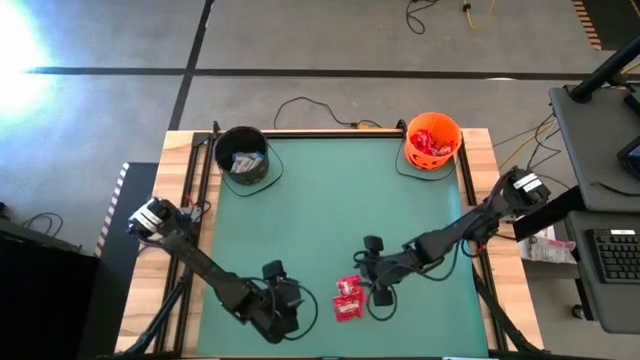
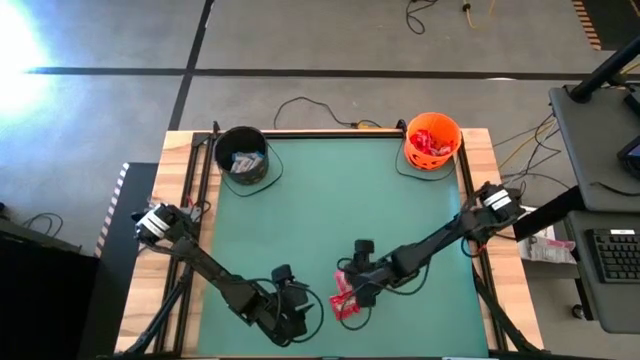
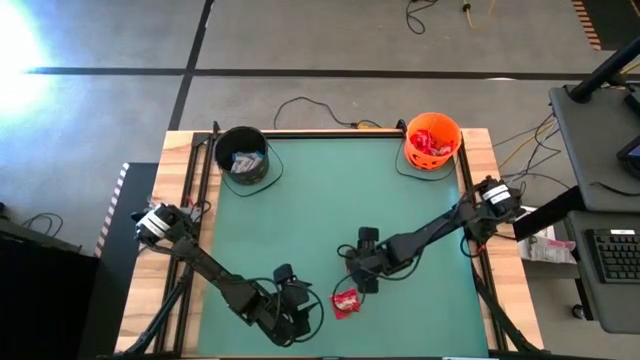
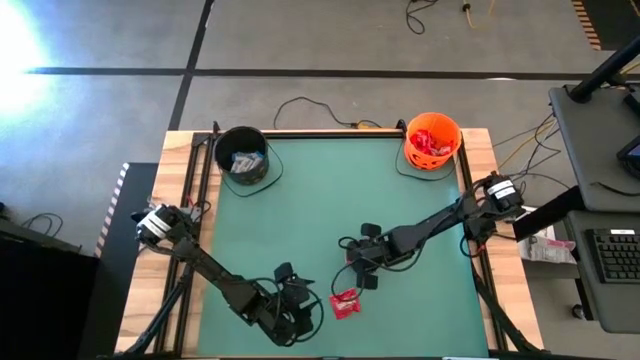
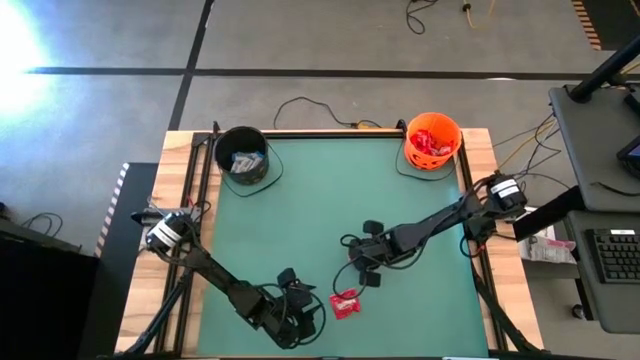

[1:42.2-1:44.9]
Task: Sort candy by brand, put in halloween buckets
Put the red candy into the orange bucket

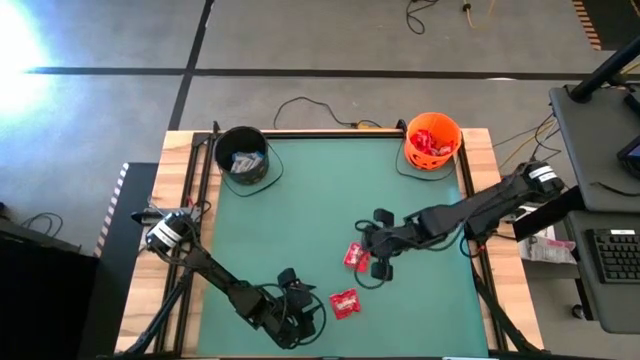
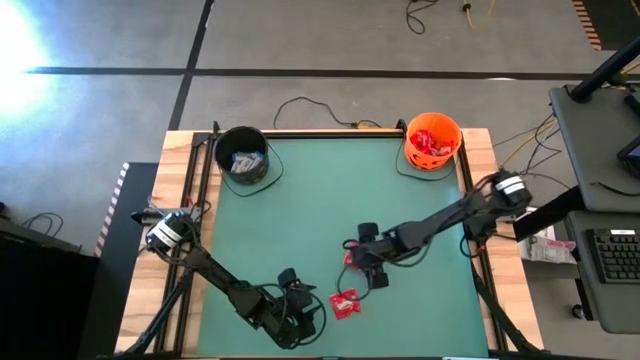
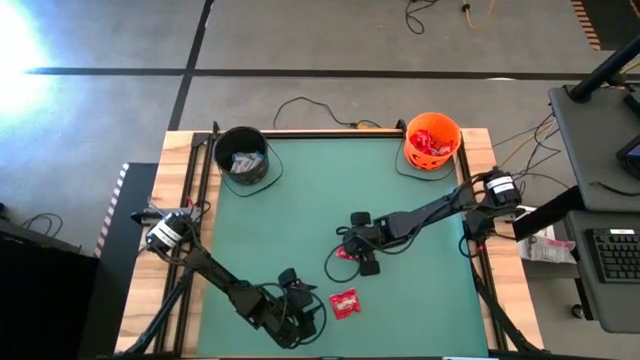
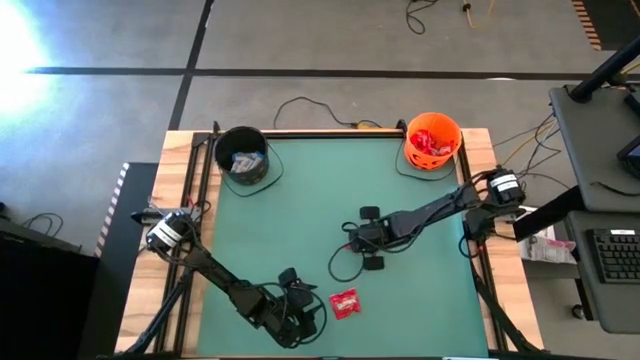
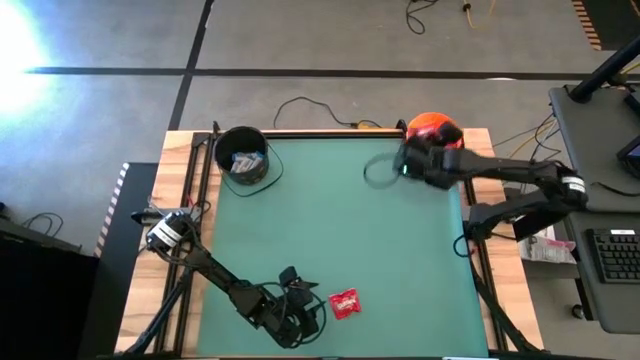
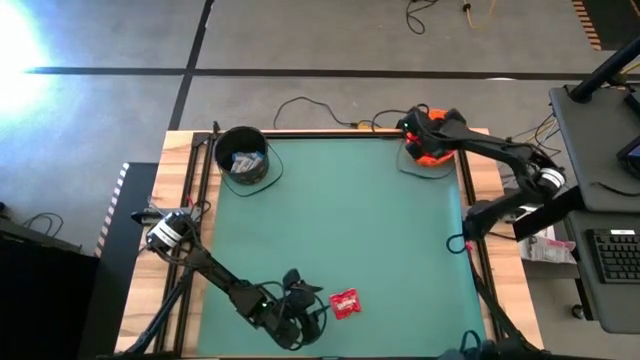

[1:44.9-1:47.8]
Put the red candy into the orange bucket

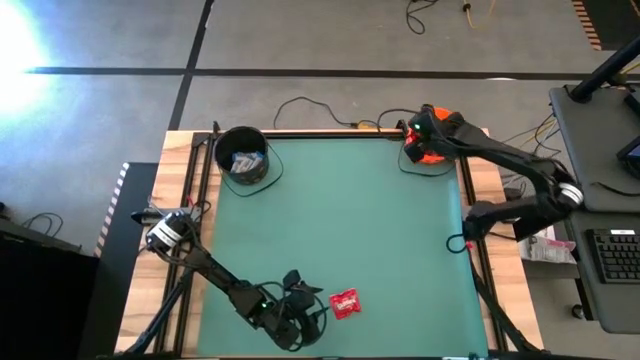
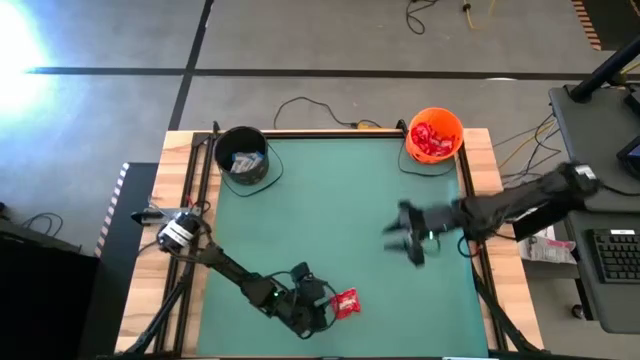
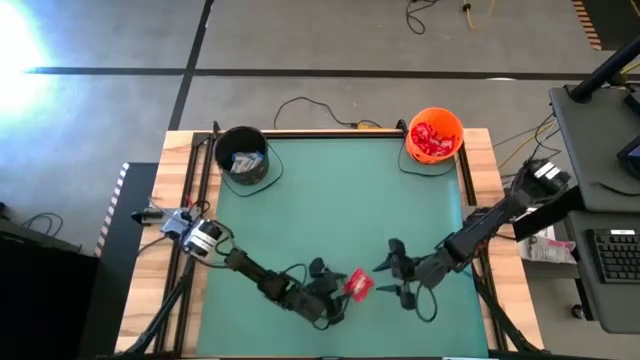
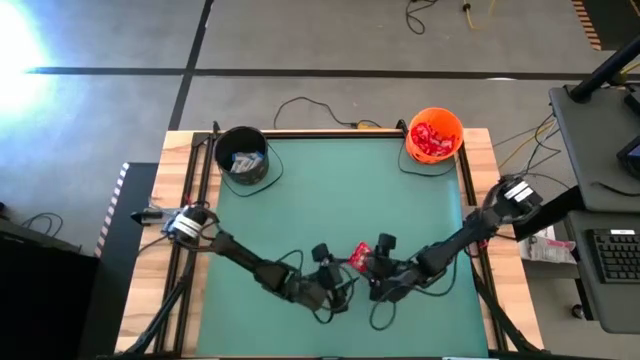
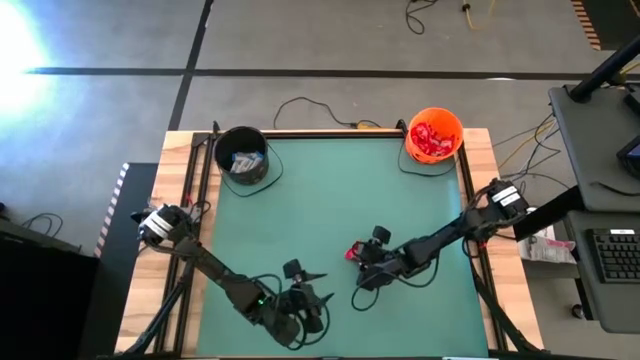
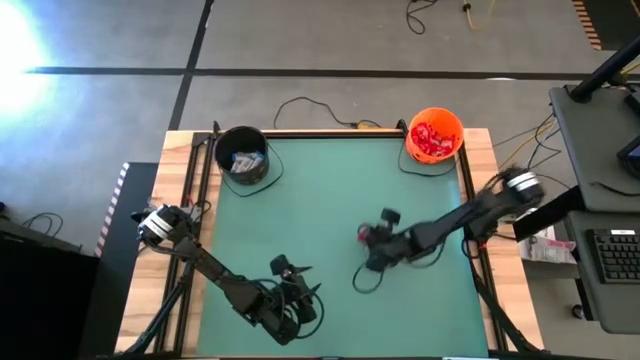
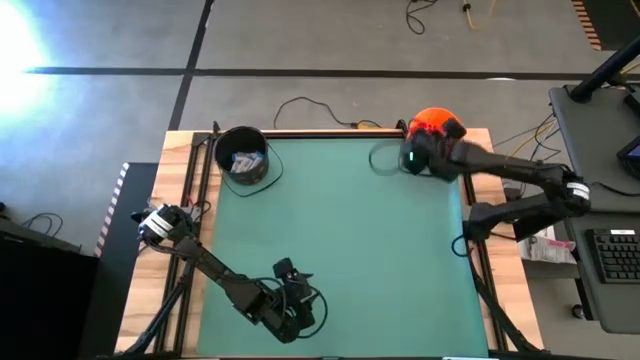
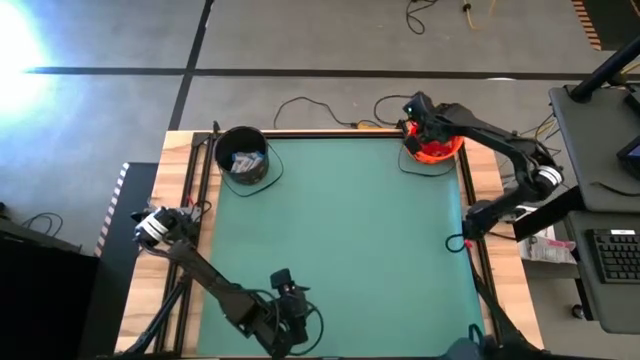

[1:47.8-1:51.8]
Put the red candy into the orange bucket

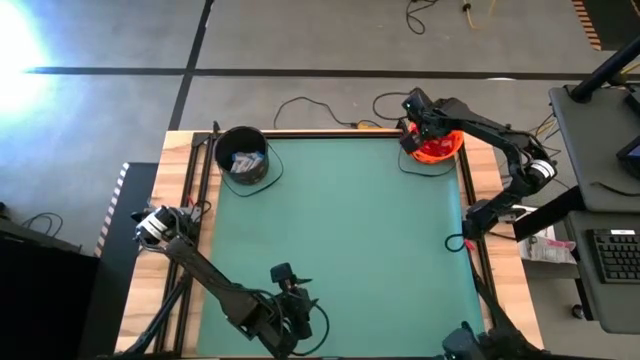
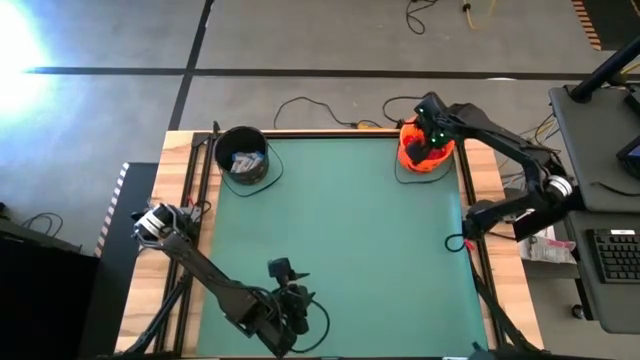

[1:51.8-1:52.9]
Adjust the orange bucket

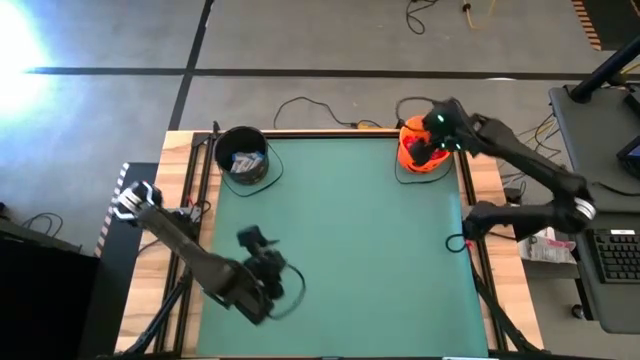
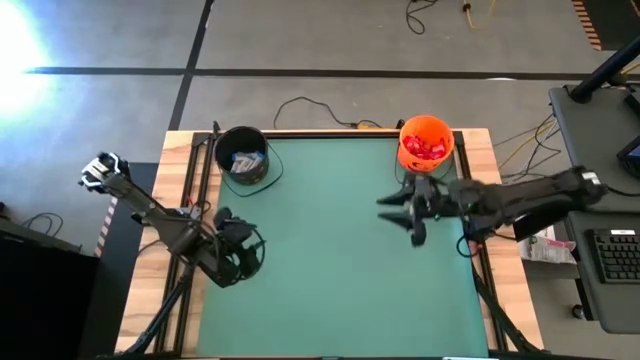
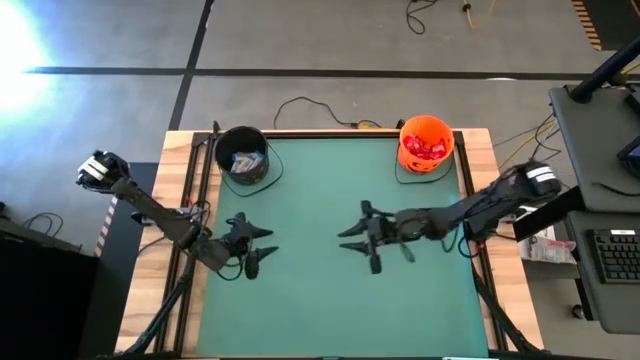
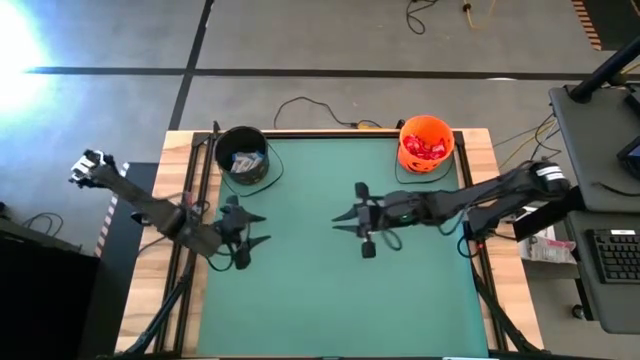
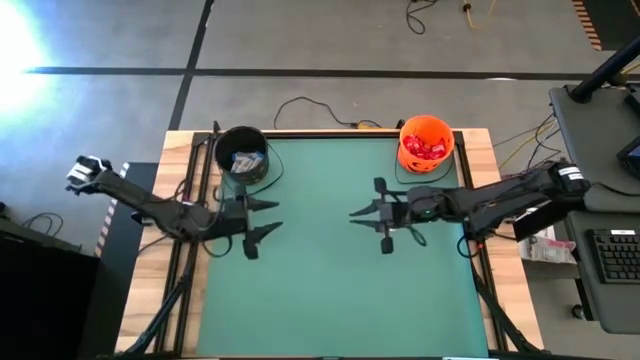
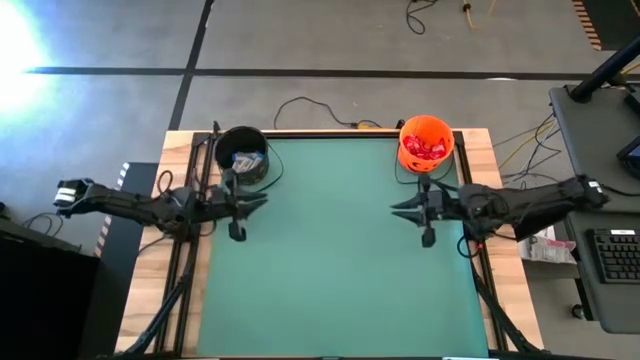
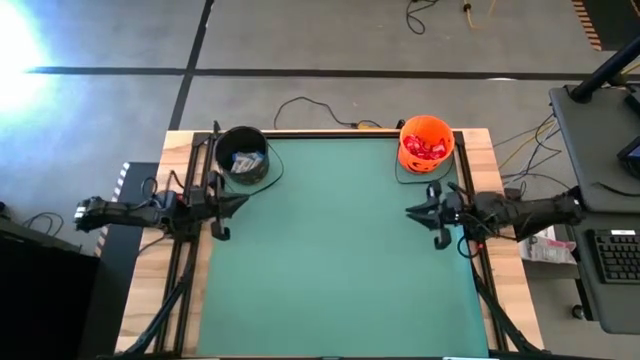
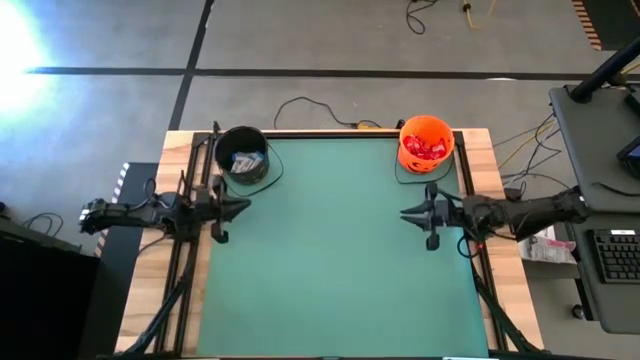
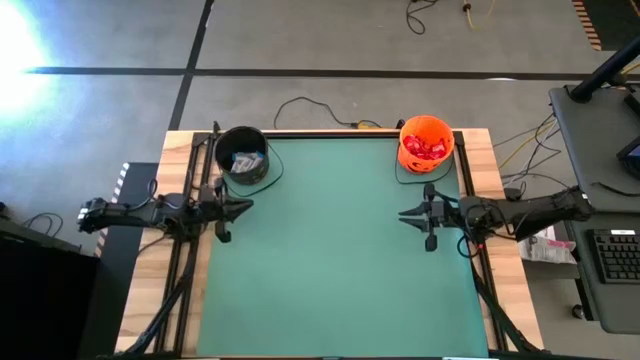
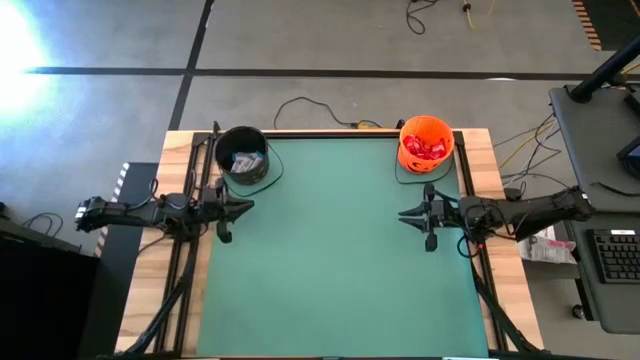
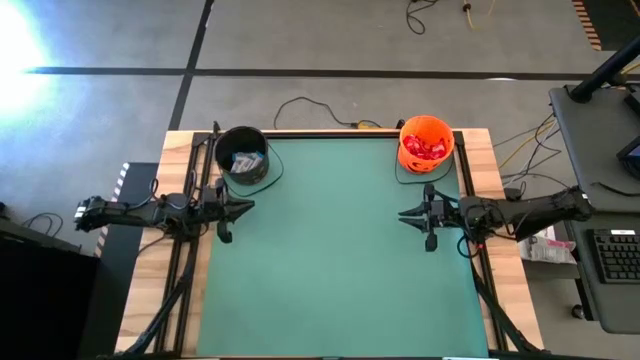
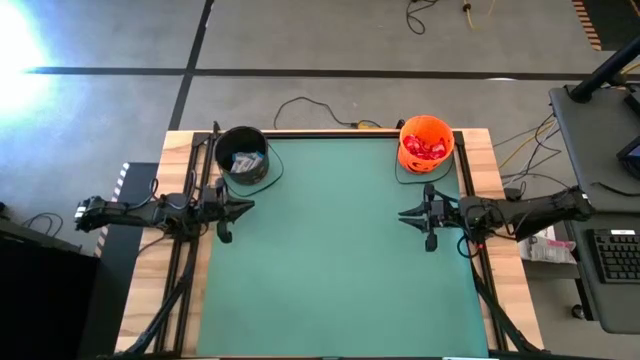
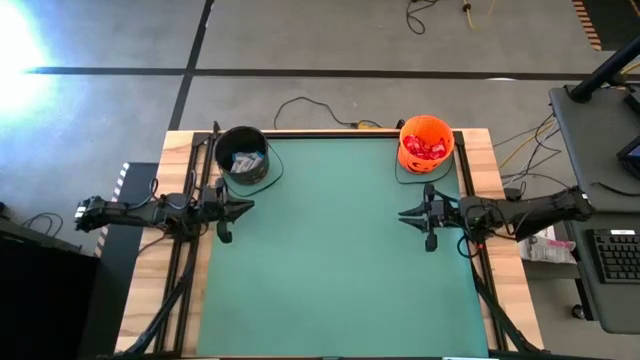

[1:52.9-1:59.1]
Return to Home Position

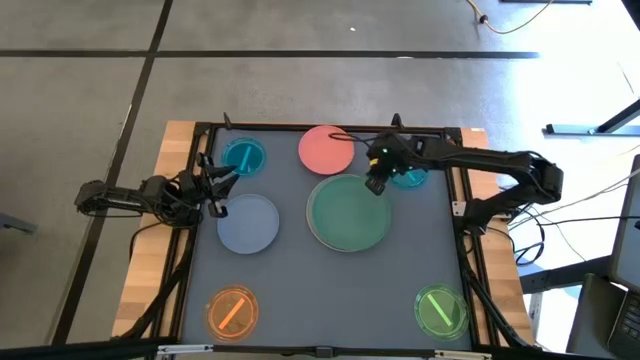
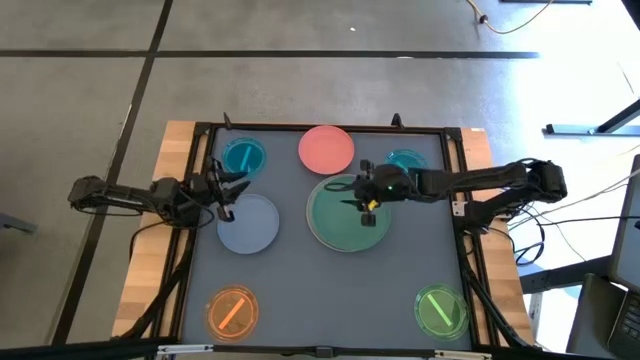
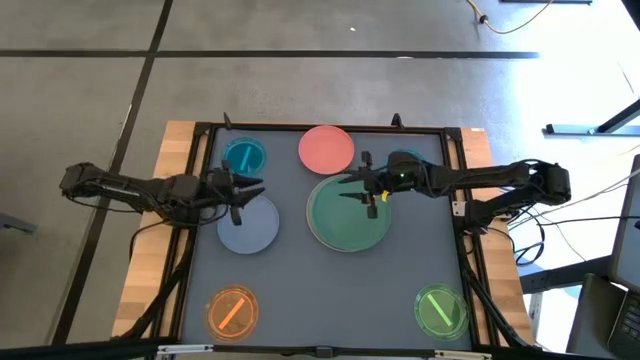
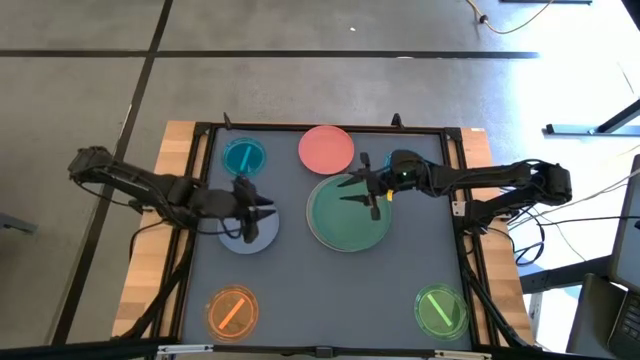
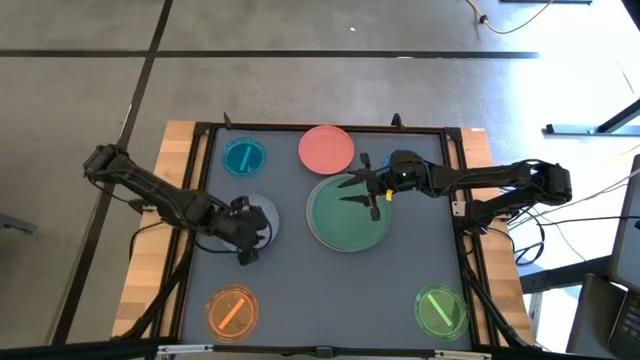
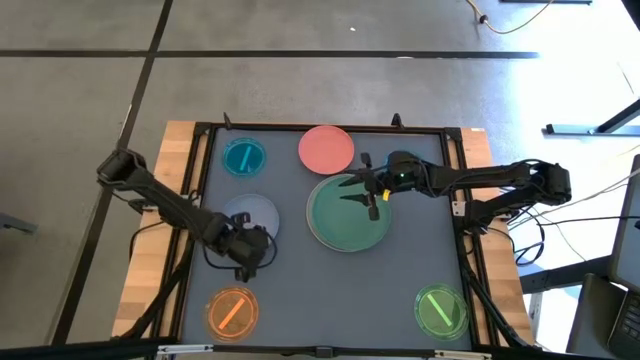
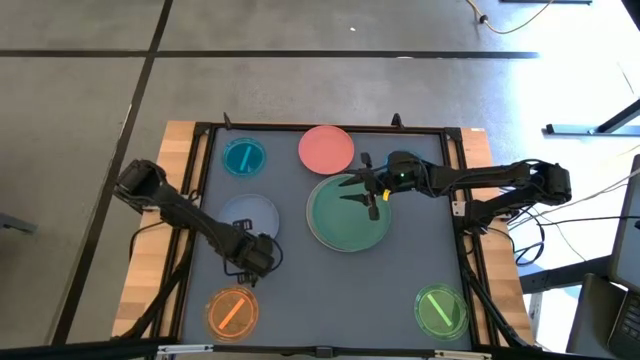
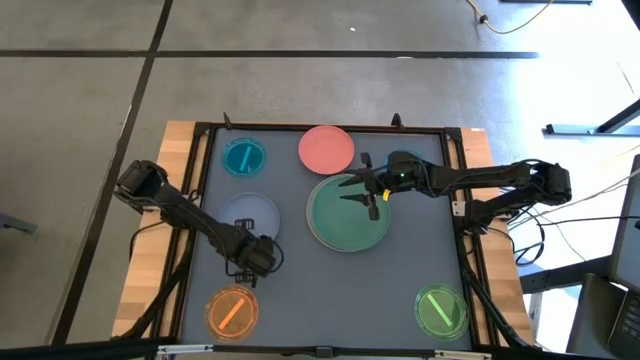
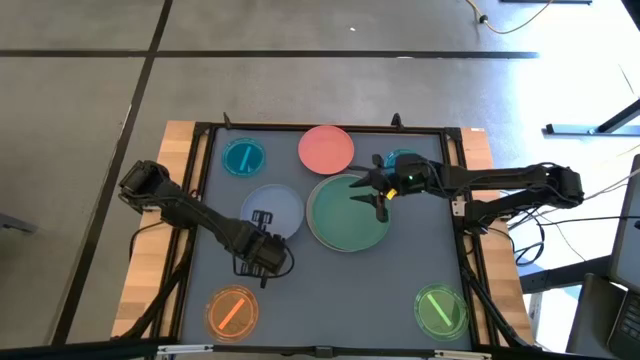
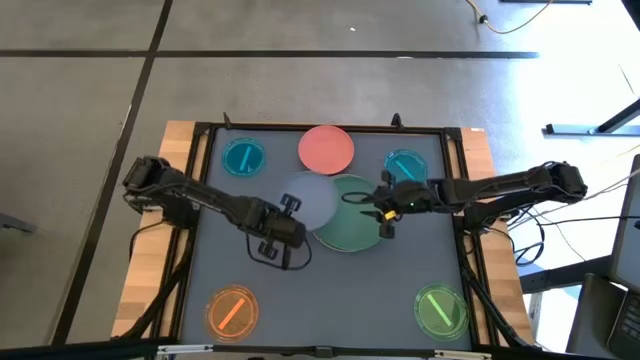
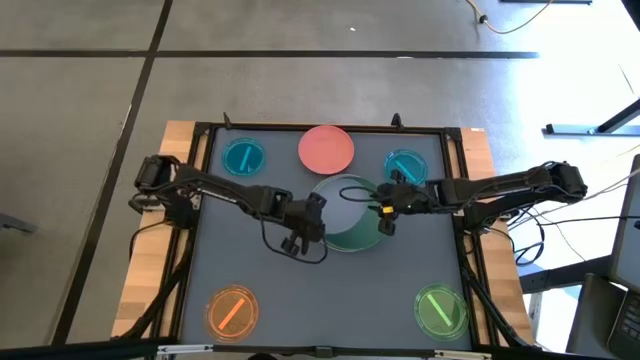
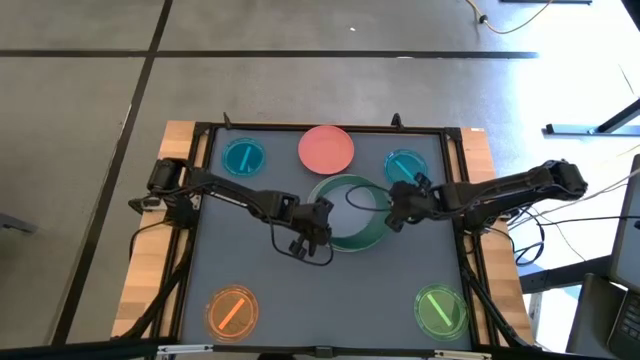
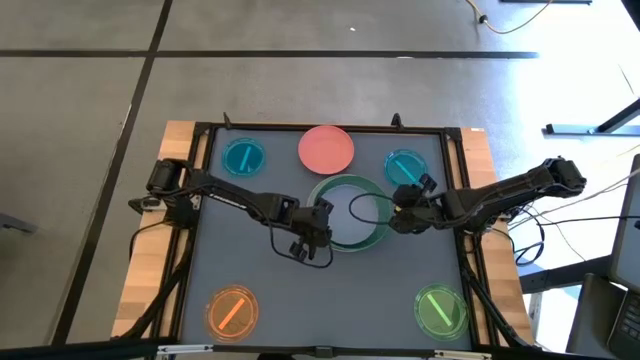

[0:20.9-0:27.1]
Task: Stack plastic plates
Stack the blue plate on top of the green plate
